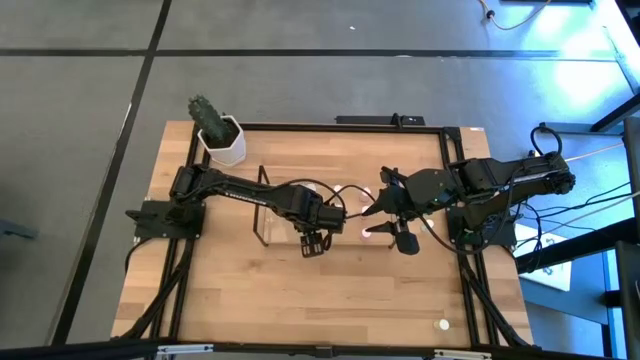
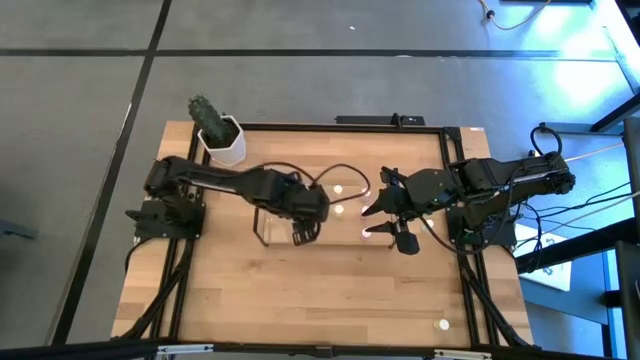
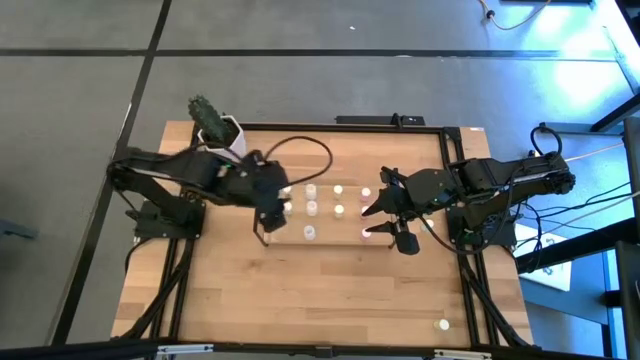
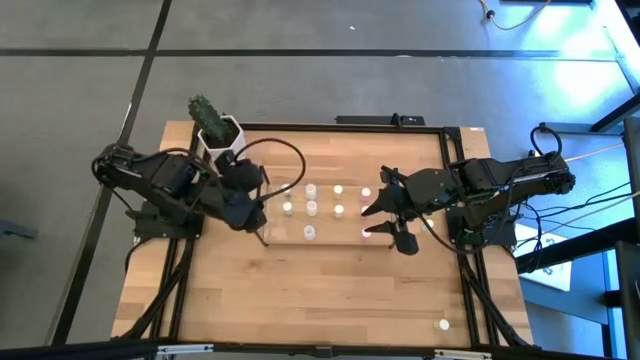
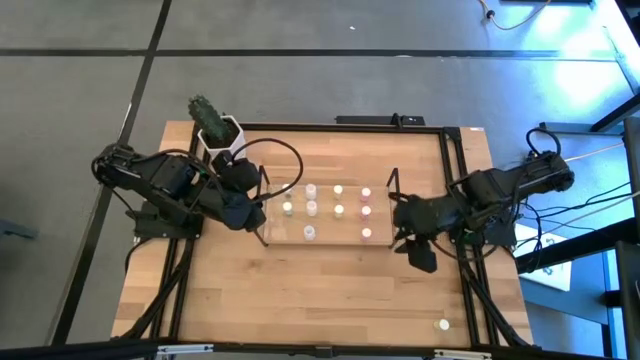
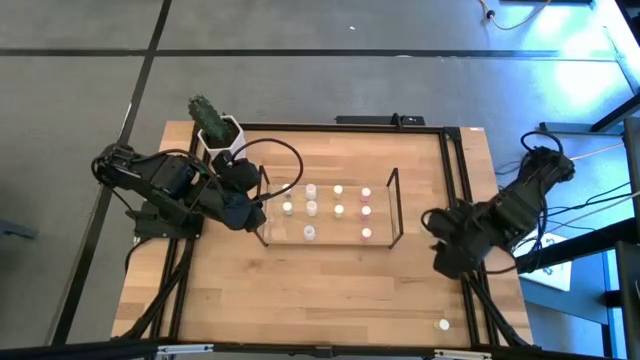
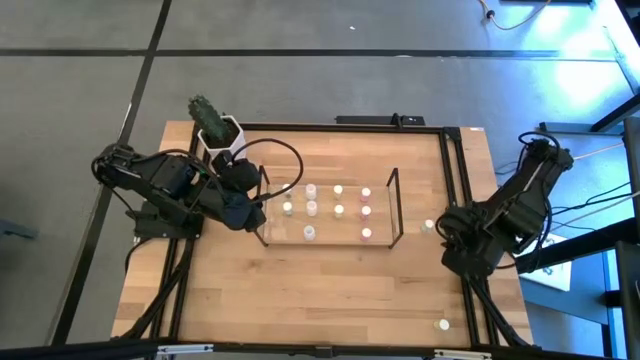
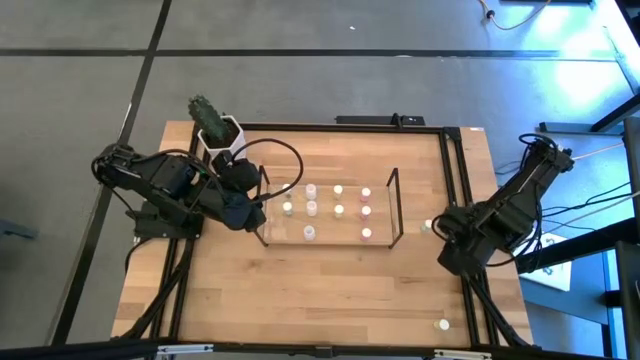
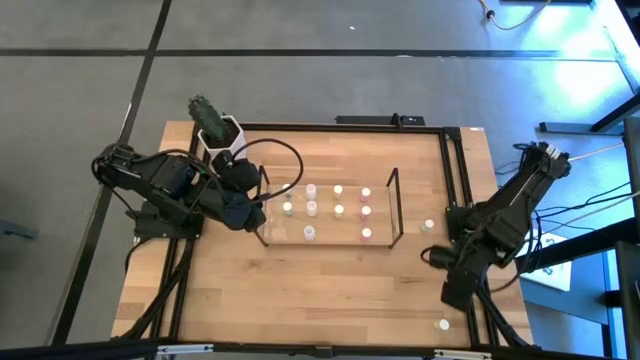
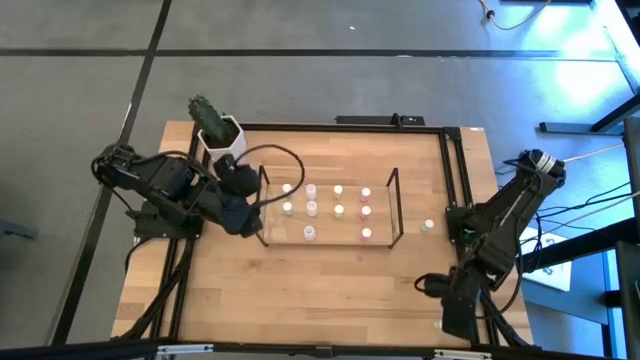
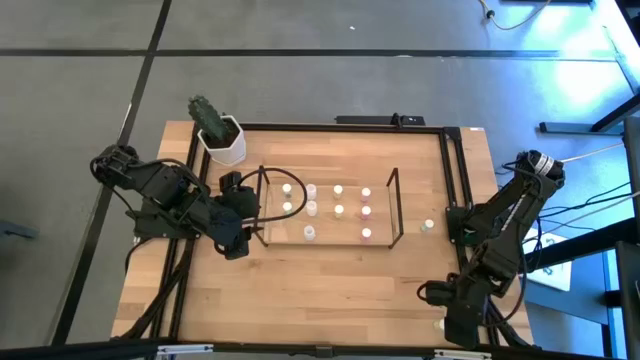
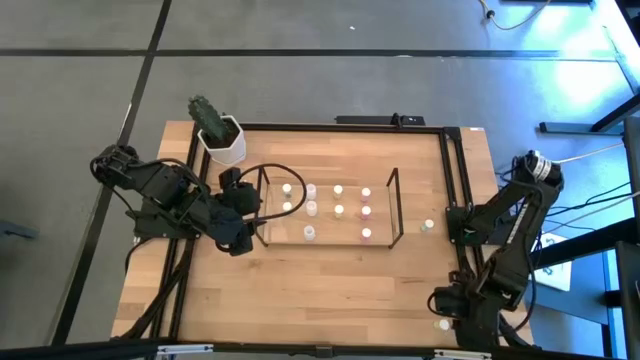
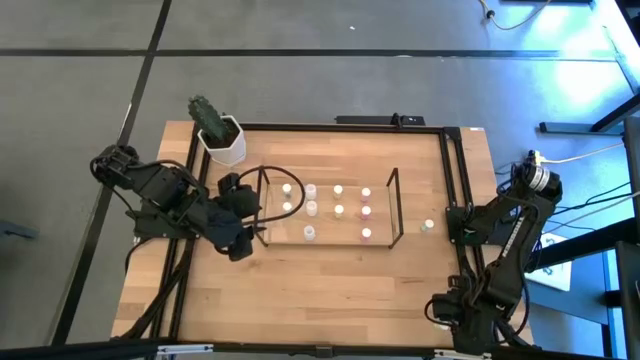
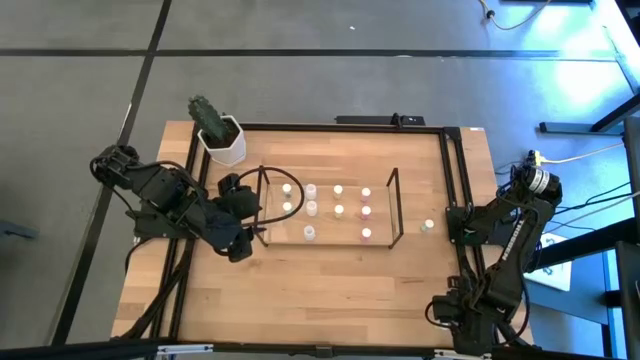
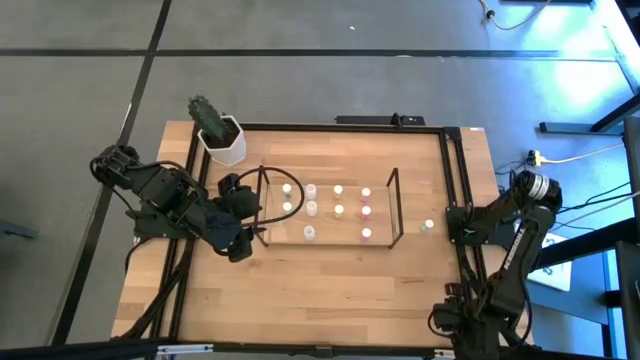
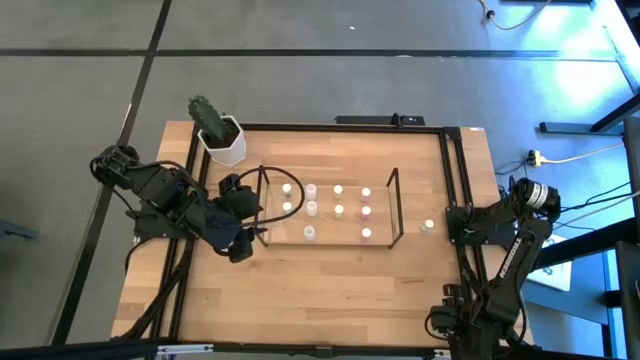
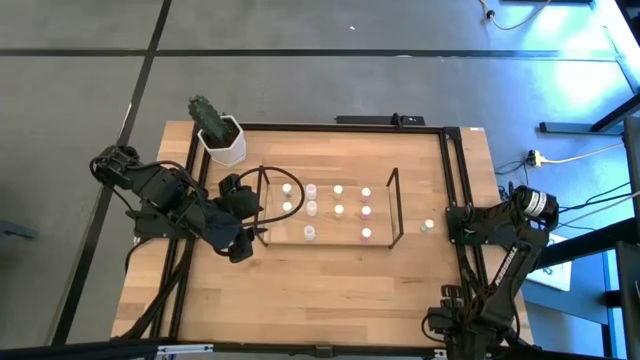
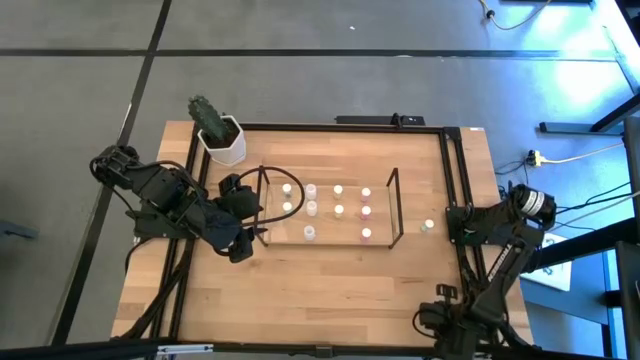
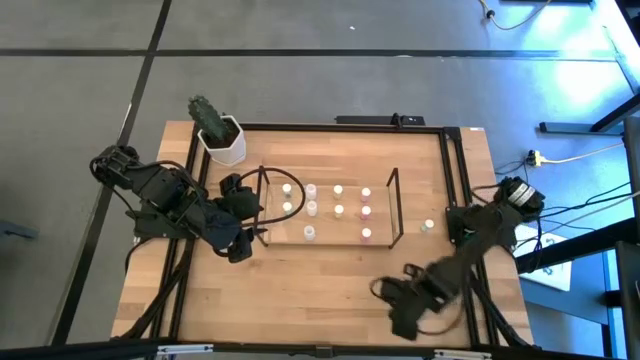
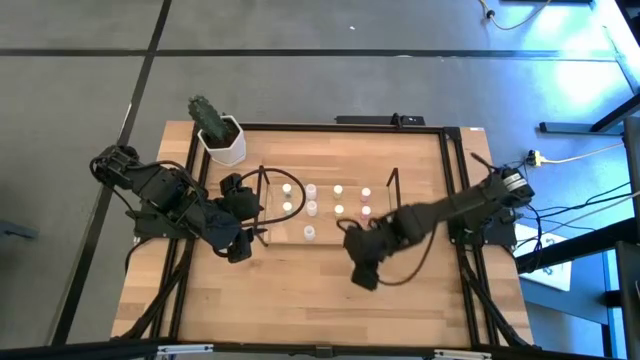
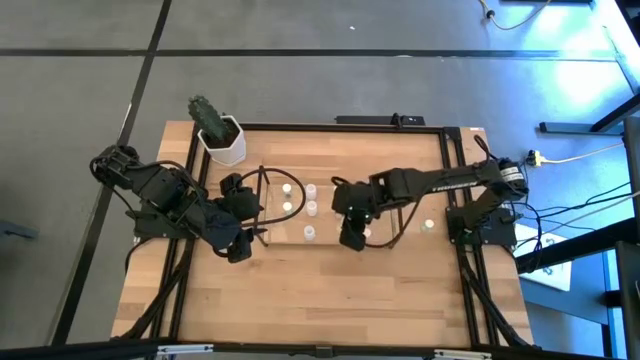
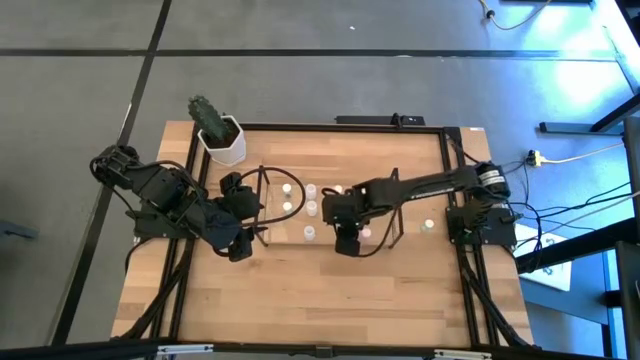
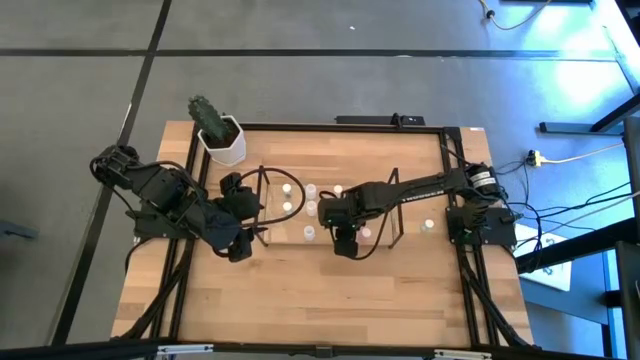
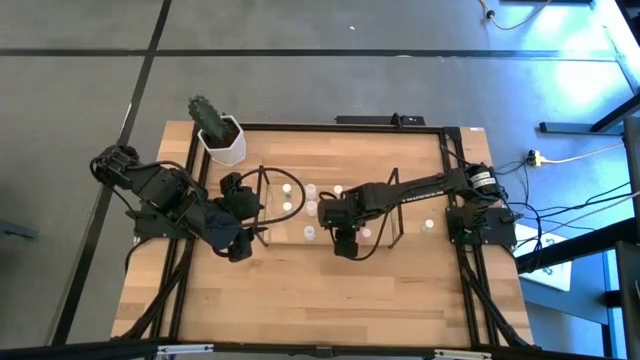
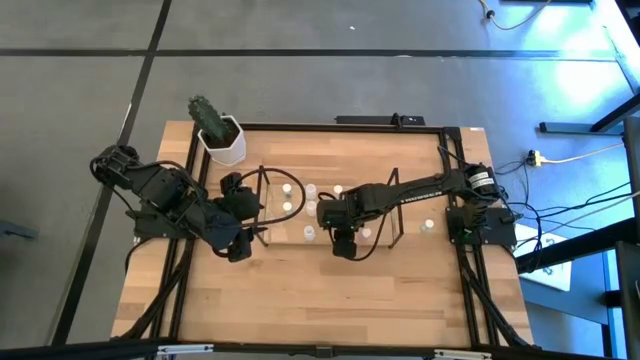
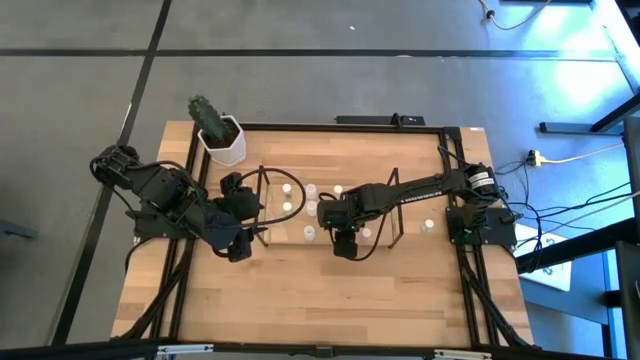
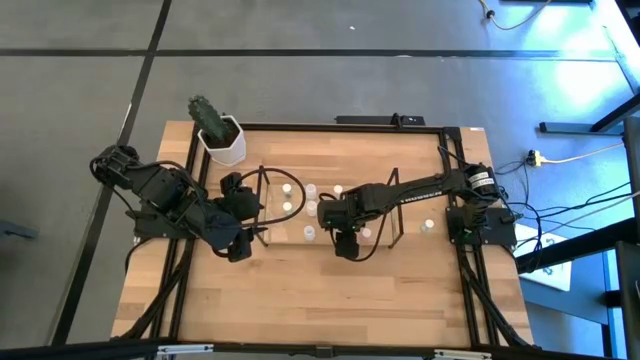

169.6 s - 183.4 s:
Task: Pick and place medicine bottles onto shelf by color
Put the yellow pill bottle aligned with the other yellow pill bottles on the shelf

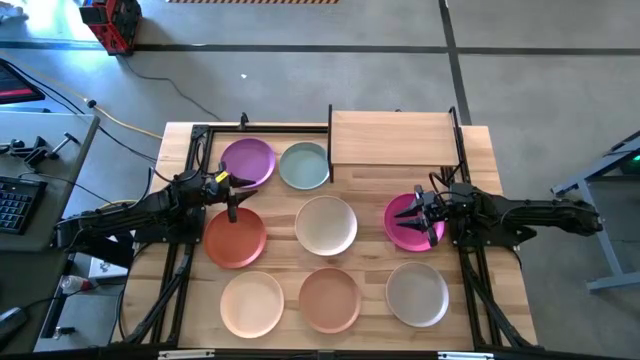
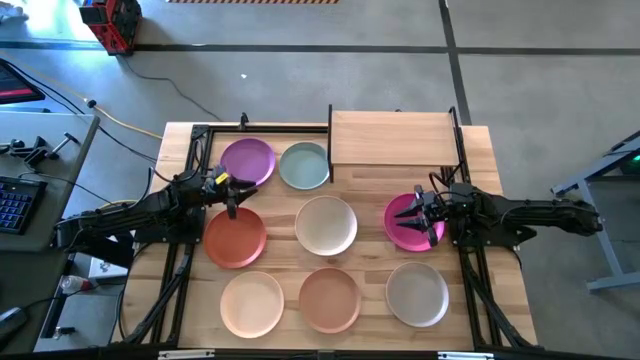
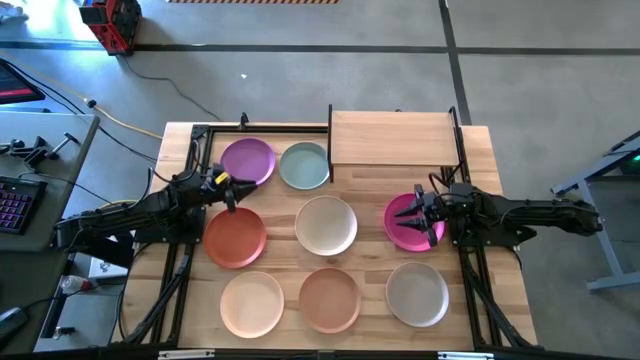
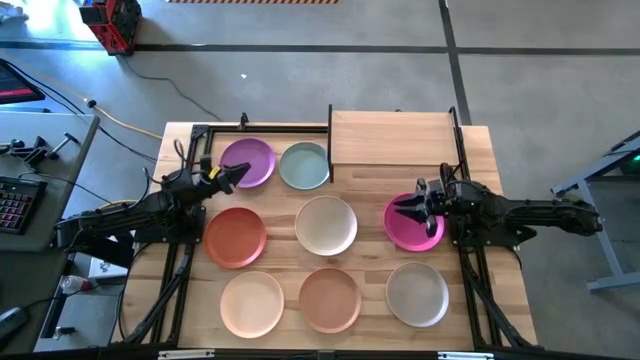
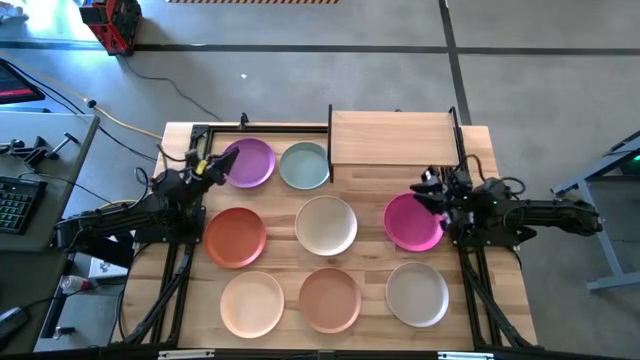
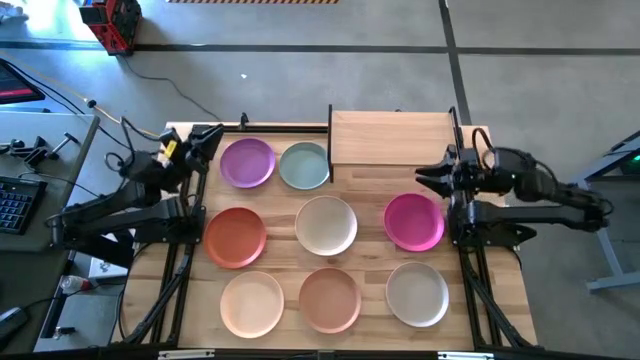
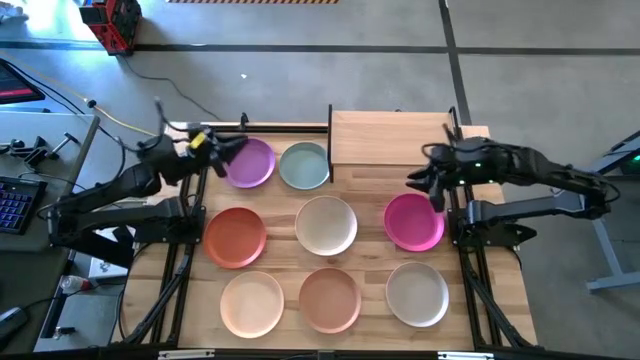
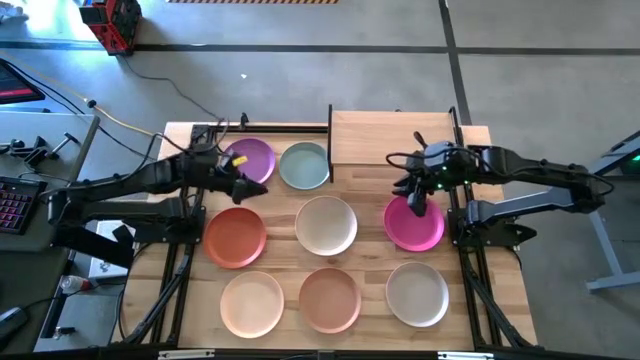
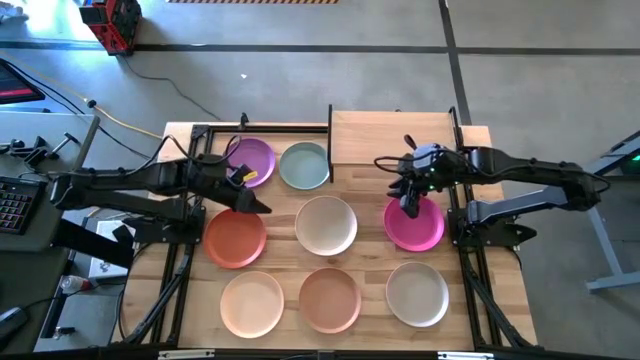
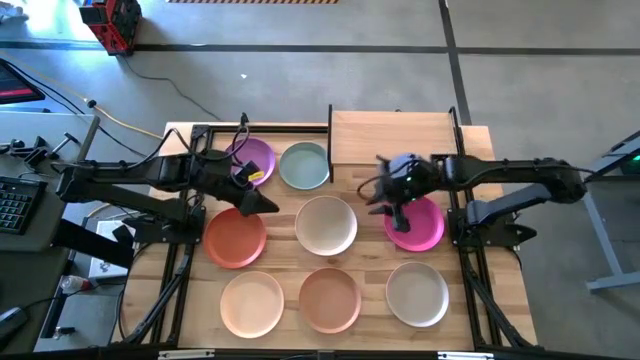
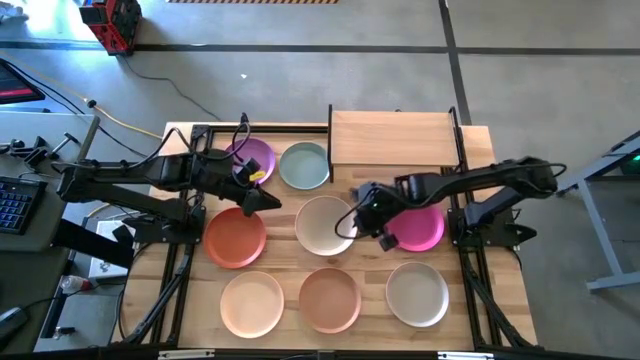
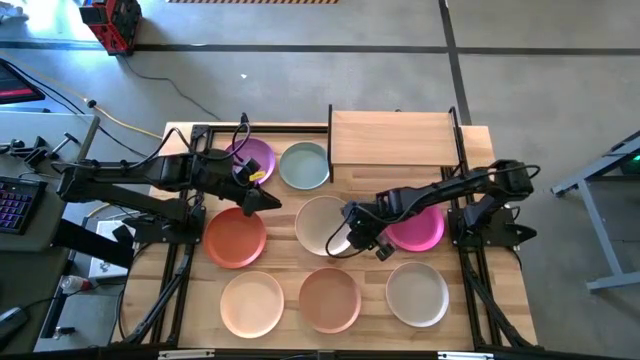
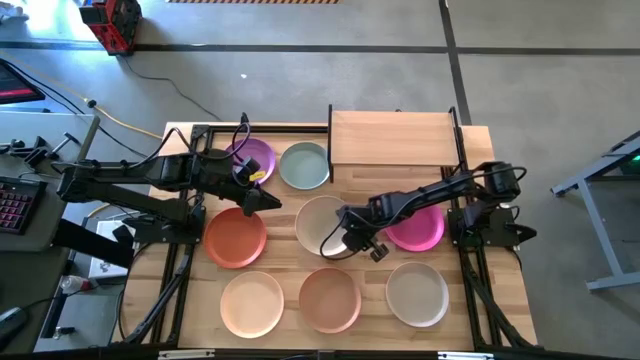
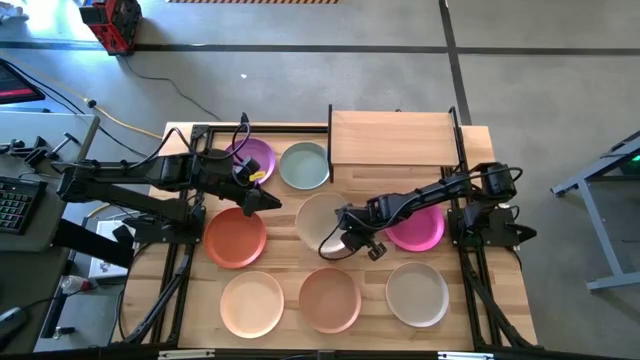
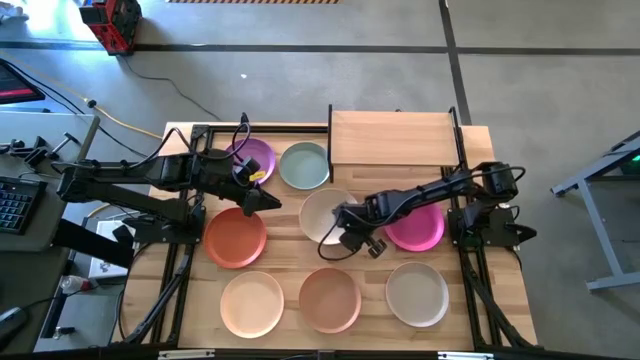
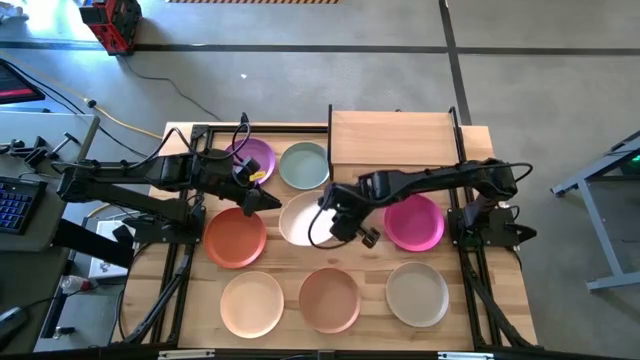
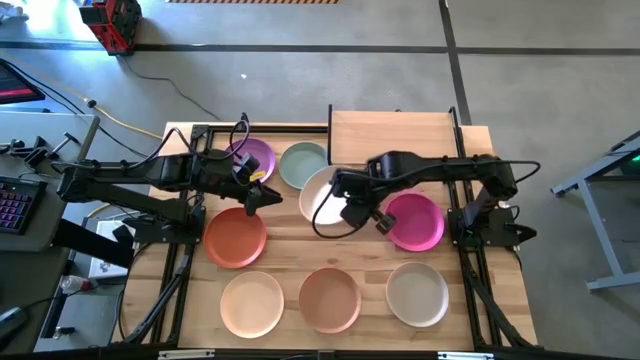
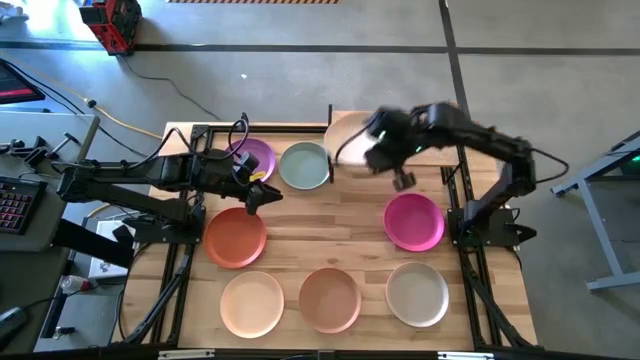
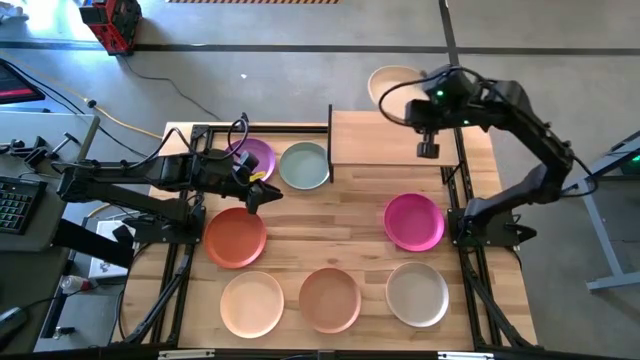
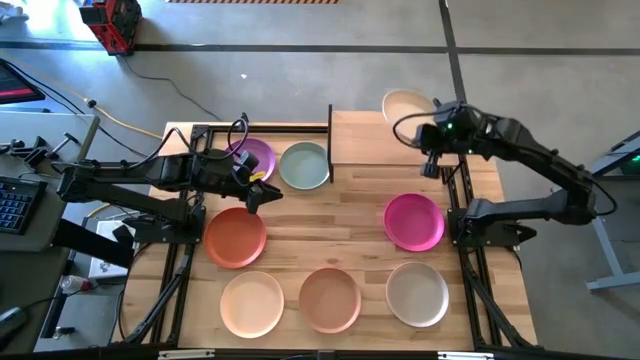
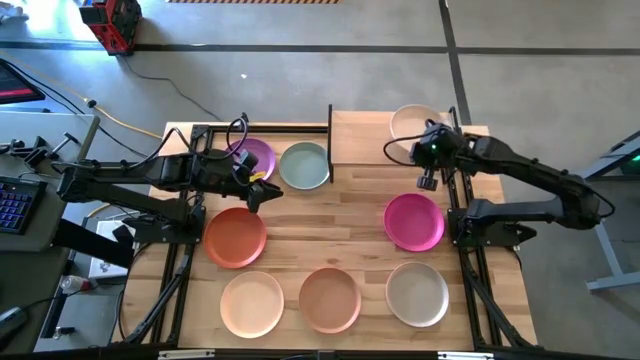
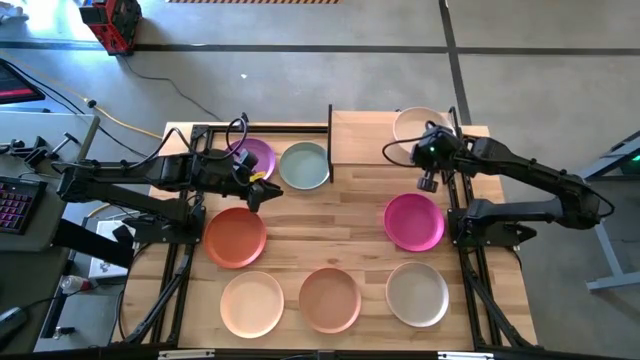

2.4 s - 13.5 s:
Task: Place and stack plates onto a shelf
Put the white plate on the shelf
